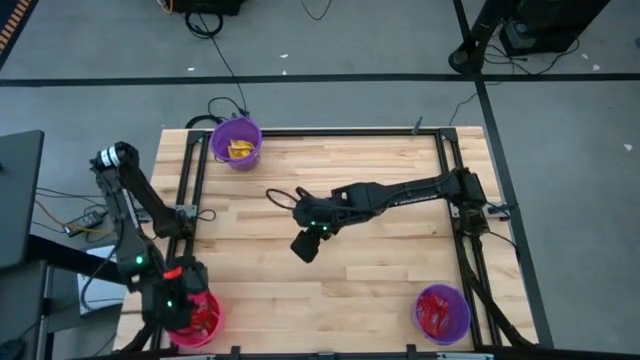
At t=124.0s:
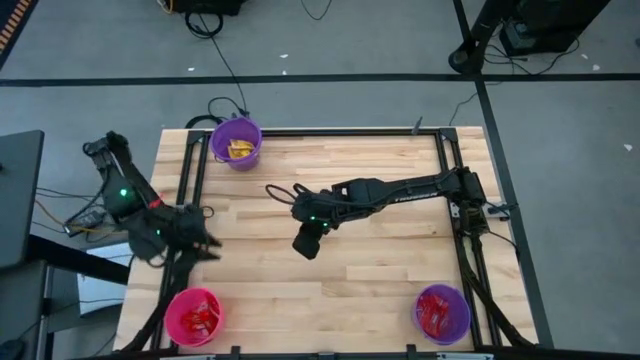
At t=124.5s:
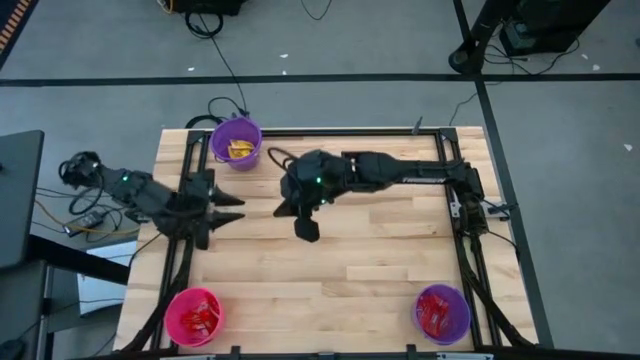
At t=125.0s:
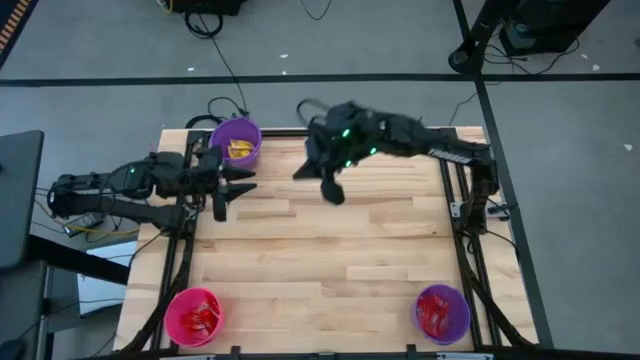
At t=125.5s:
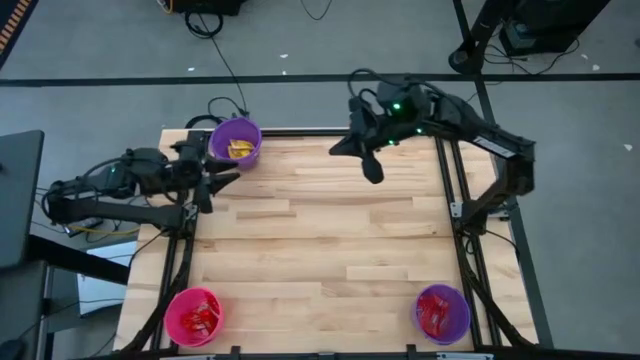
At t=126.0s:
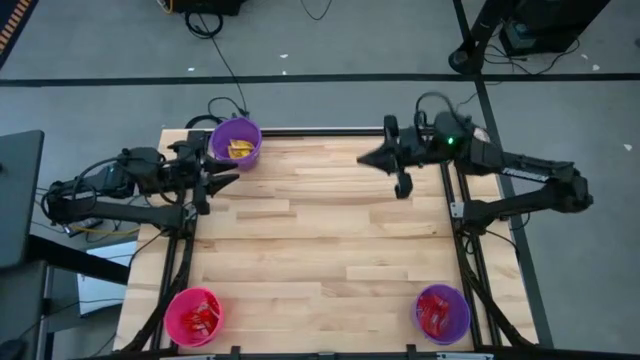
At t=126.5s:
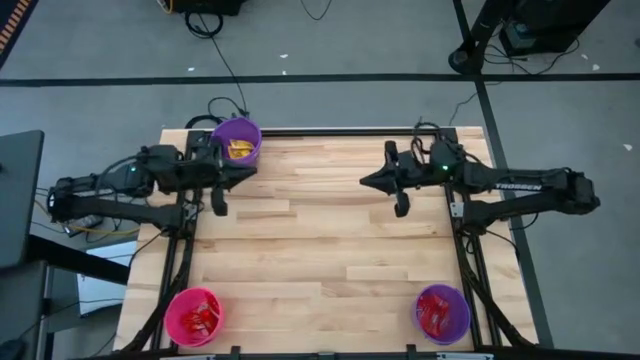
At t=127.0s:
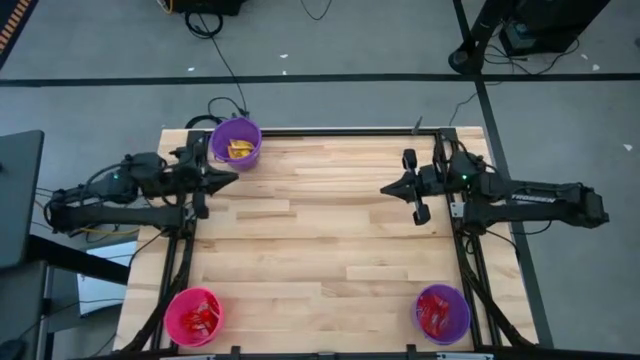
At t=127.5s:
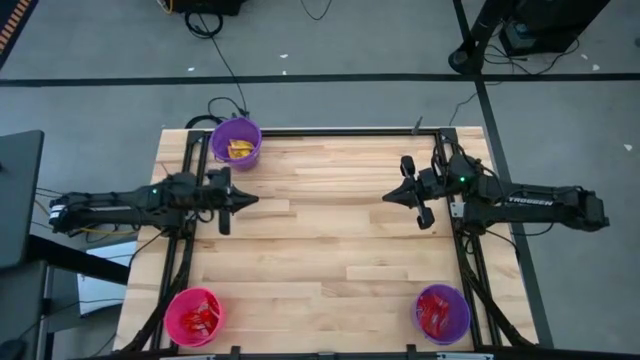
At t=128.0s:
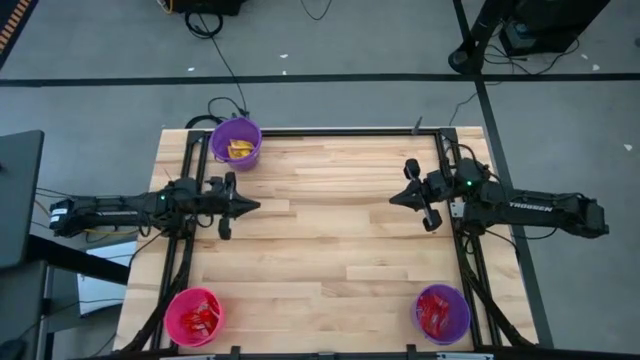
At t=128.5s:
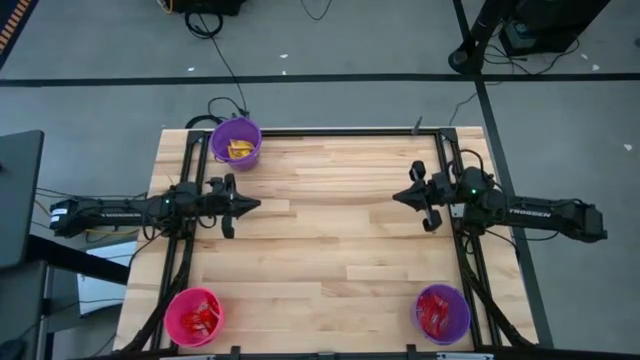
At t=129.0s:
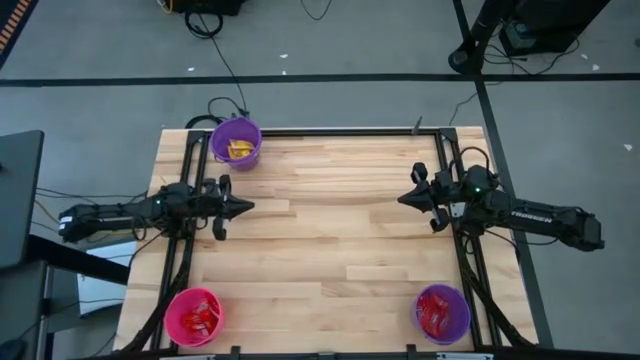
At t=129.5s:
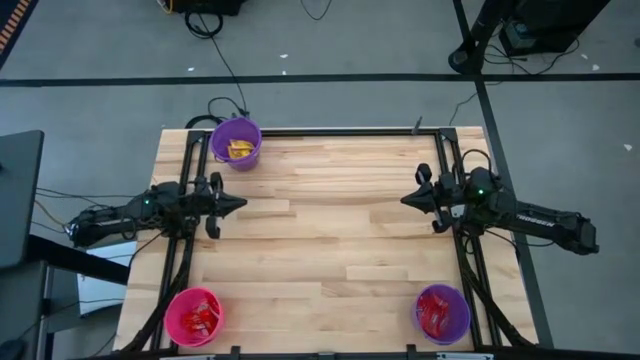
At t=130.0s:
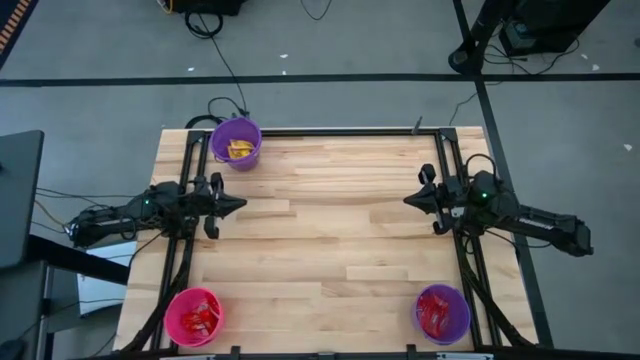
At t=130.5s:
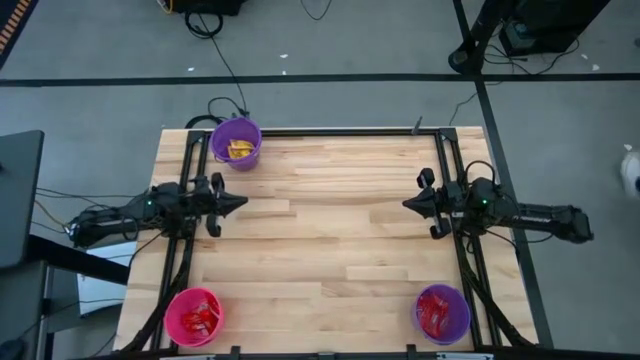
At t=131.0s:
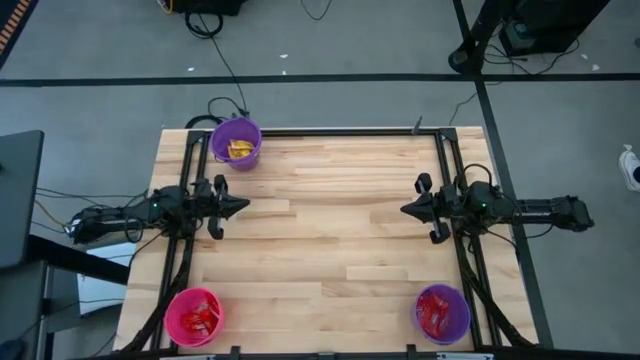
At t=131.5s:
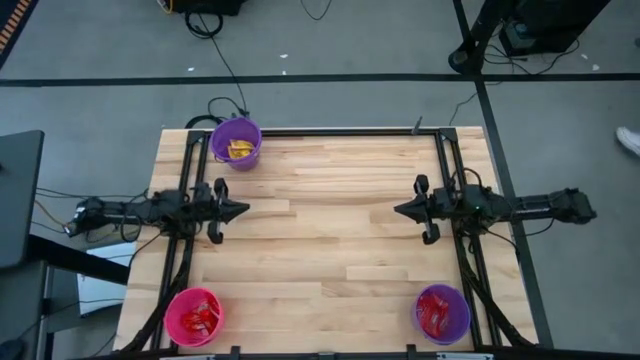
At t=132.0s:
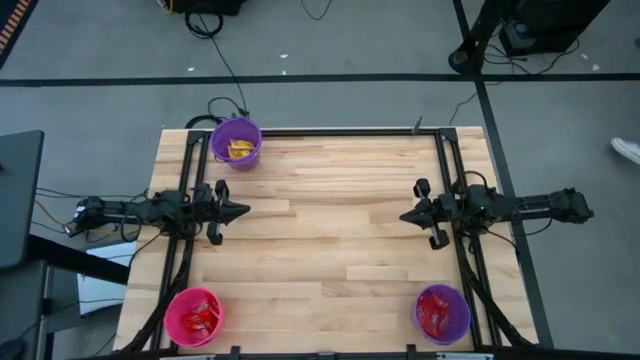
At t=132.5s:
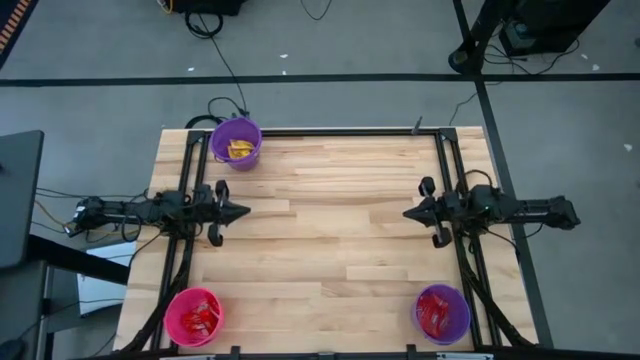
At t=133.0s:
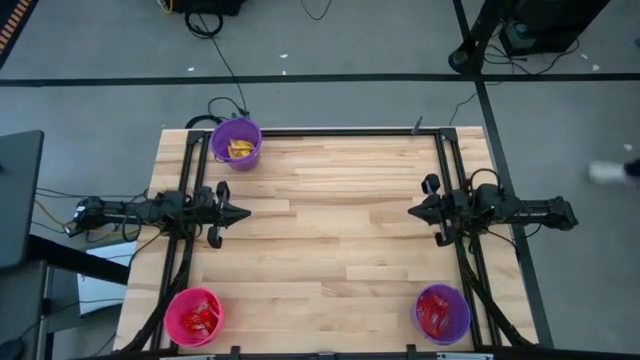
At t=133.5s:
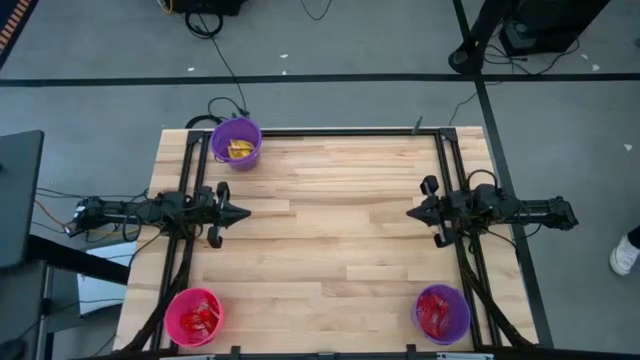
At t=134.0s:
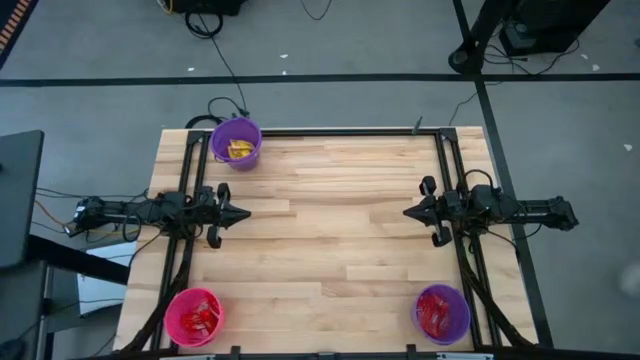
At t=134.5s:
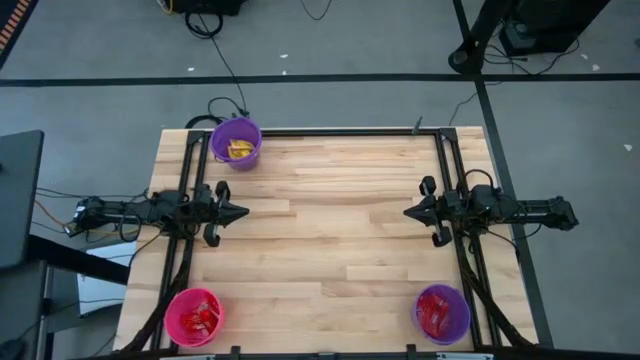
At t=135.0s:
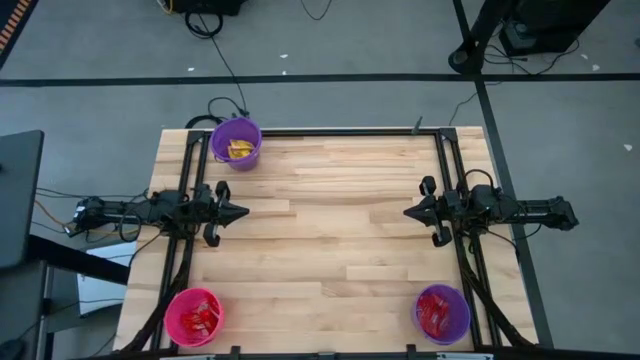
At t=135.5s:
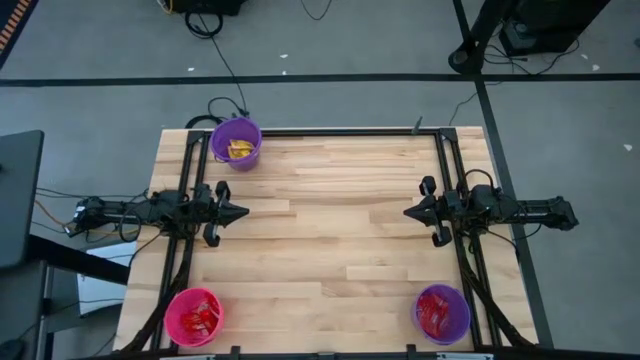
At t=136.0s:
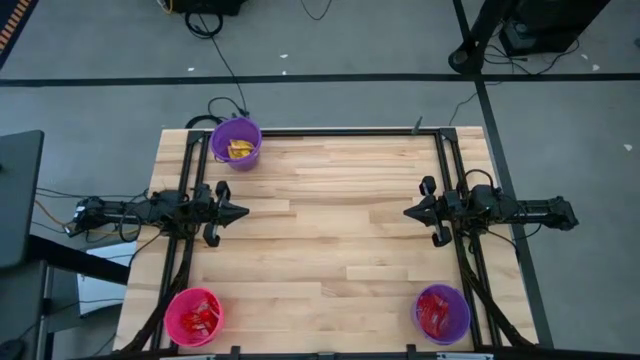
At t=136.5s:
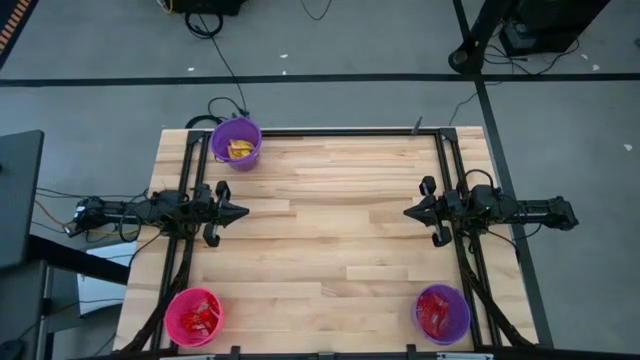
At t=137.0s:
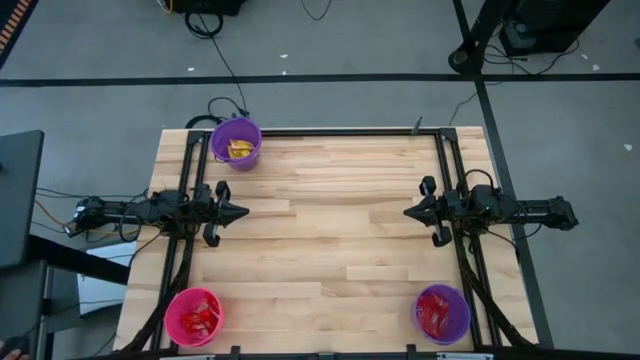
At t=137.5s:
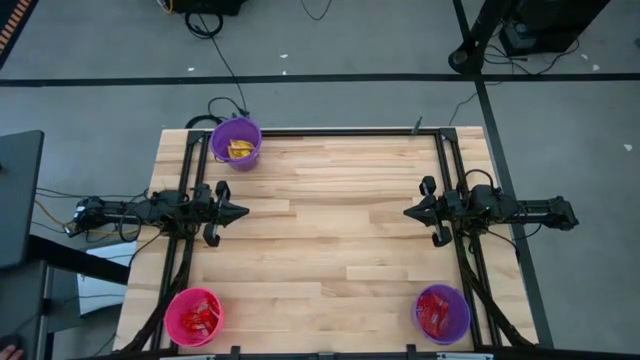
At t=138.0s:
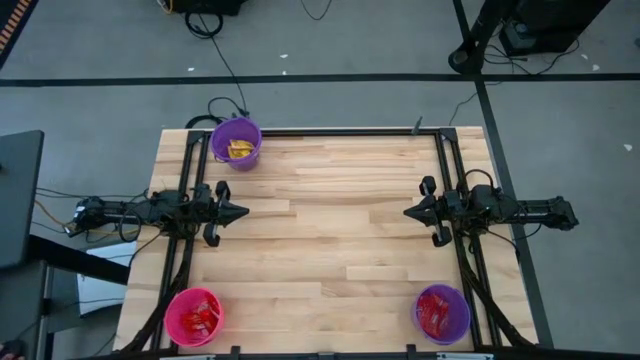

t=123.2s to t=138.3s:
Task: Sort candy by brand, put in halloween buckets
Return to Home Position

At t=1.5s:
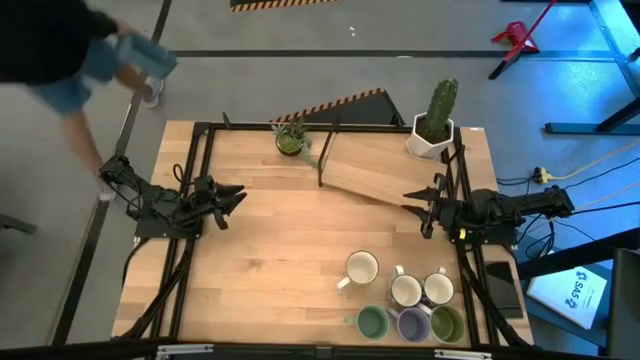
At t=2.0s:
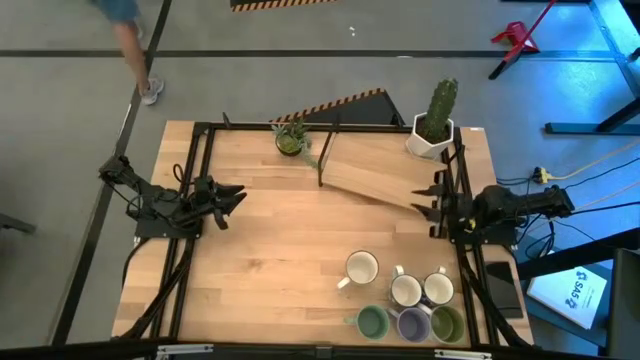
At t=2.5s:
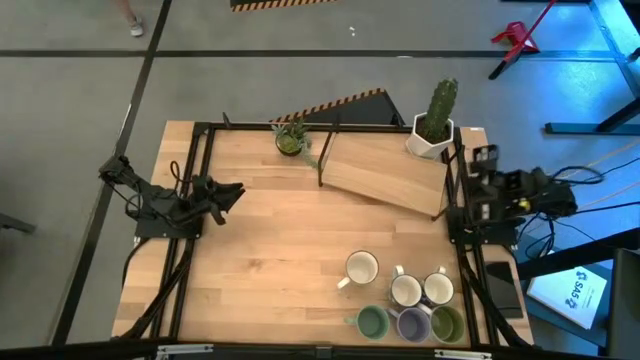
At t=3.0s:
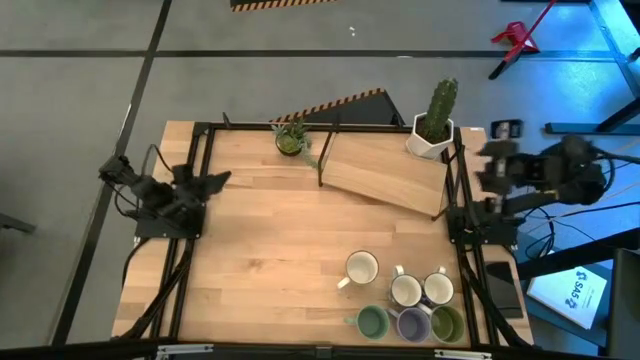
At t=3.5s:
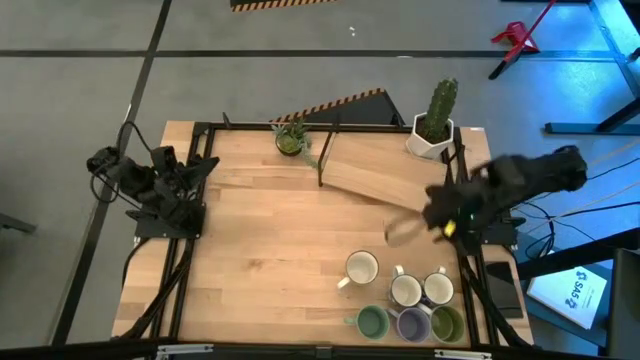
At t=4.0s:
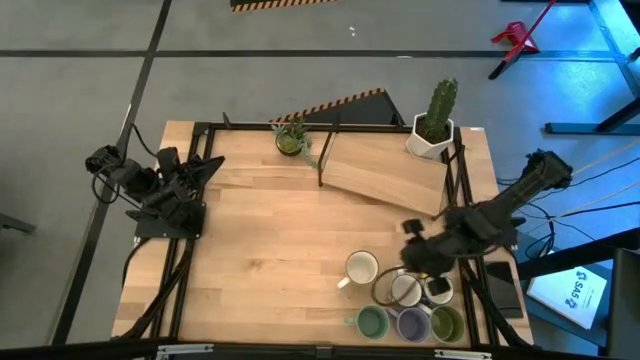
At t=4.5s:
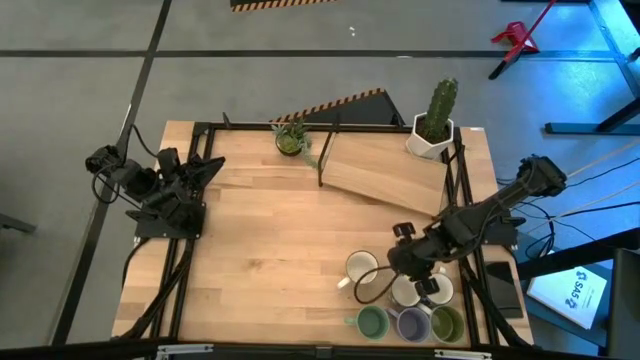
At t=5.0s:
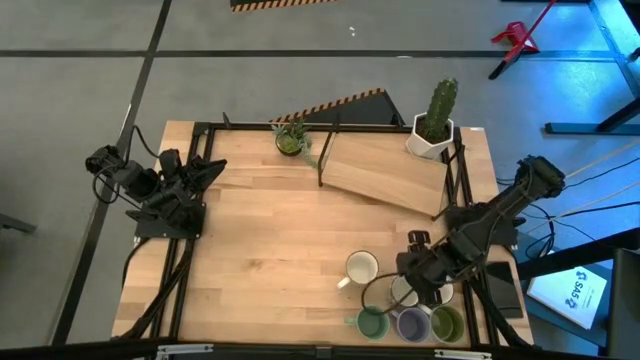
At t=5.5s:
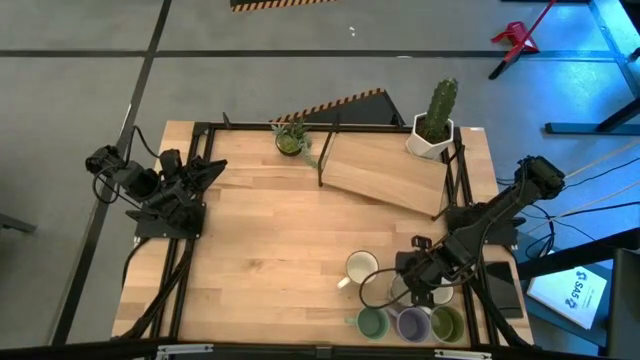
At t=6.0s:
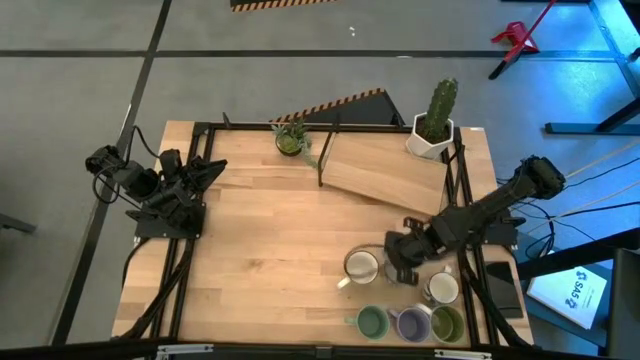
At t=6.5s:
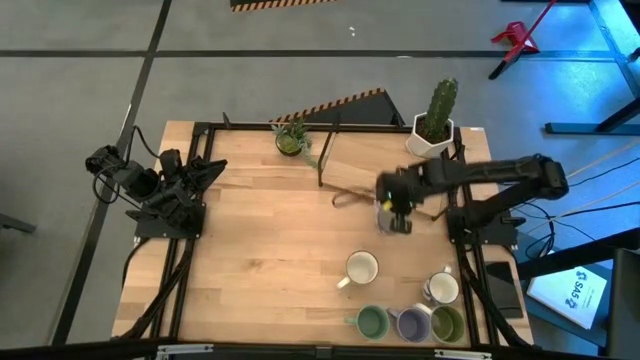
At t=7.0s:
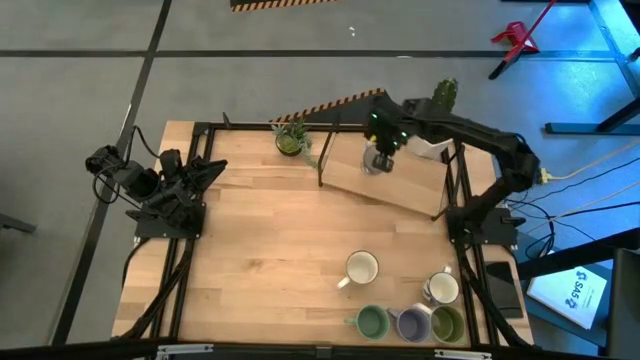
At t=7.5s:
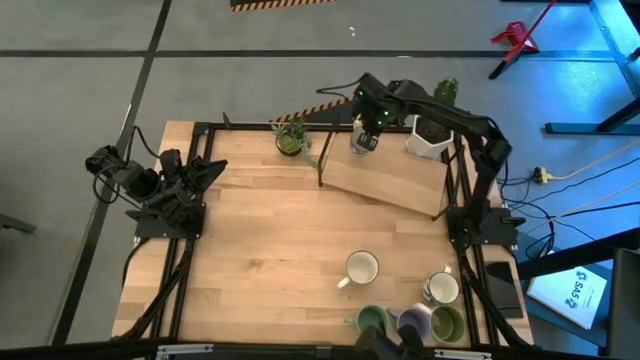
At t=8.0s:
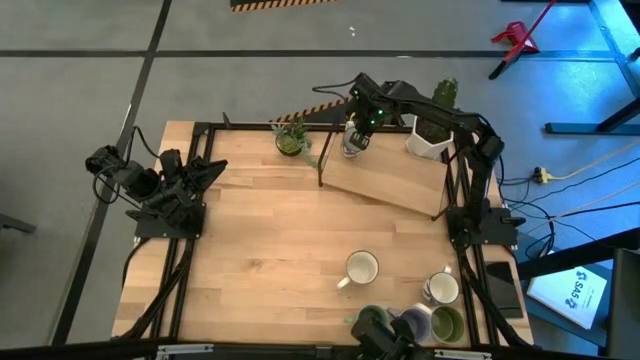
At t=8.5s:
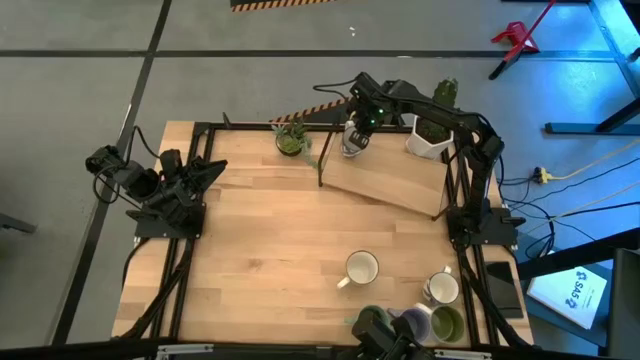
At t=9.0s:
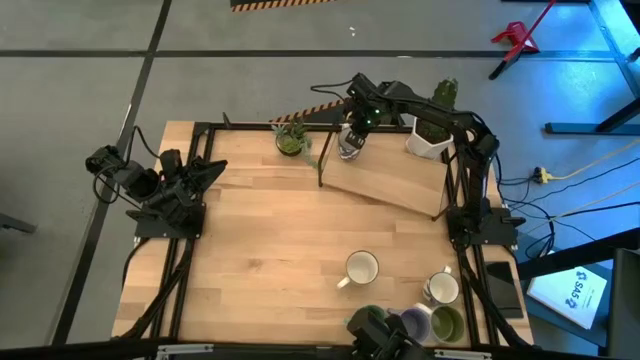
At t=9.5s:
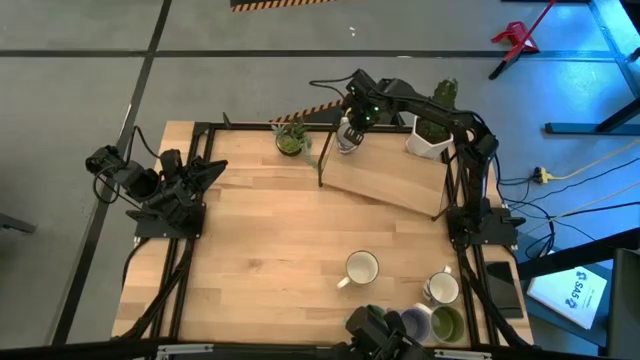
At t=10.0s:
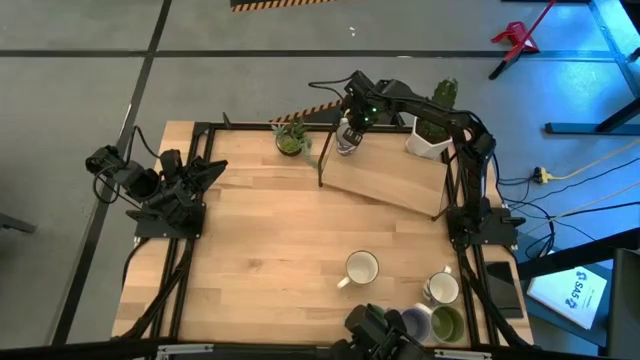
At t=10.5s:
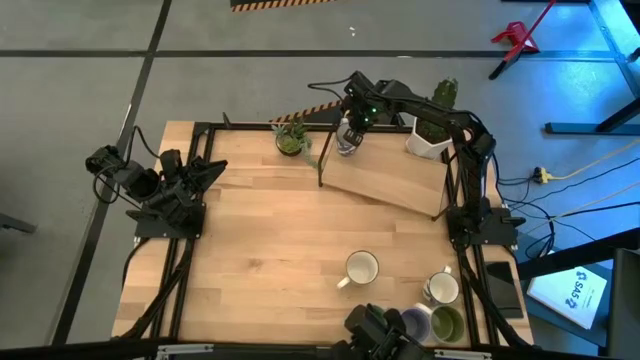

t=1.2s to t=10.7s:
Task: Place coffee mugs
Put the left blue patterned mug on the shelf
